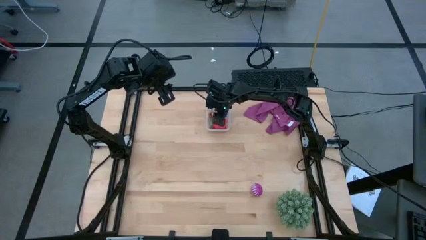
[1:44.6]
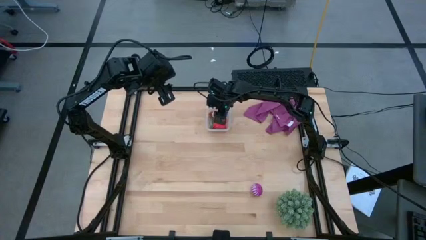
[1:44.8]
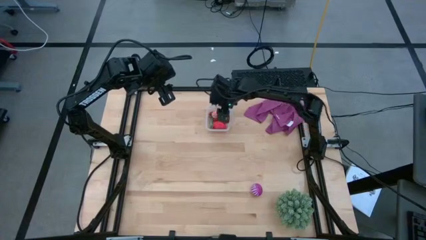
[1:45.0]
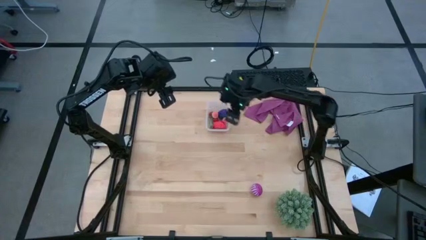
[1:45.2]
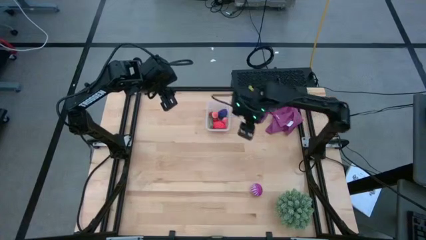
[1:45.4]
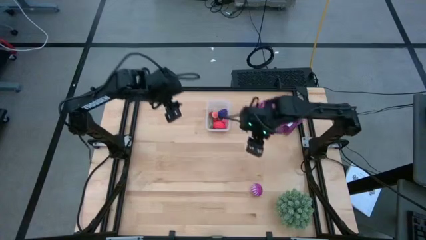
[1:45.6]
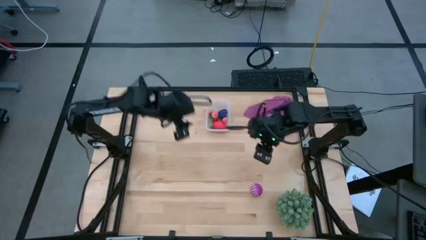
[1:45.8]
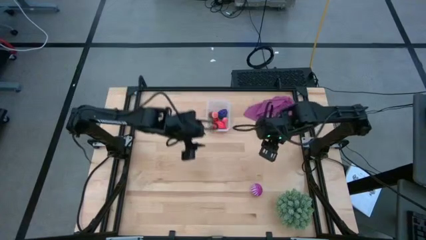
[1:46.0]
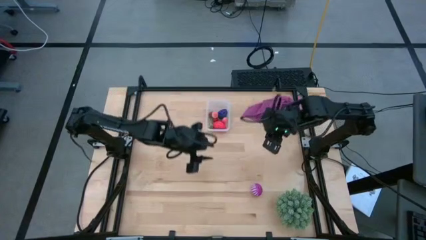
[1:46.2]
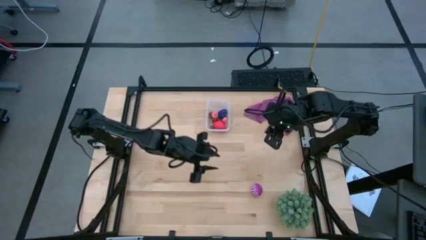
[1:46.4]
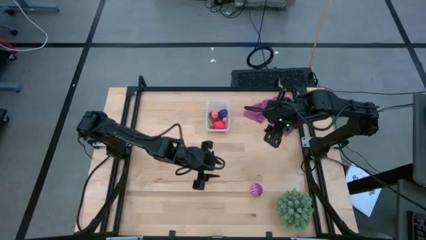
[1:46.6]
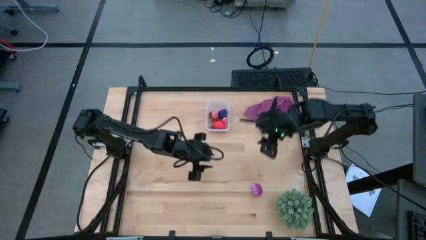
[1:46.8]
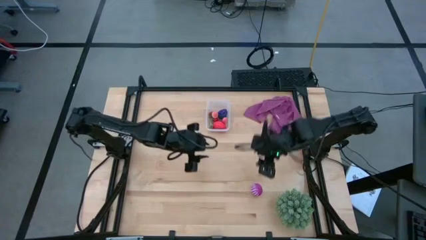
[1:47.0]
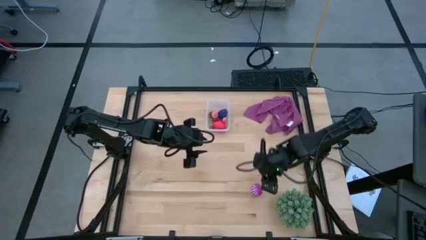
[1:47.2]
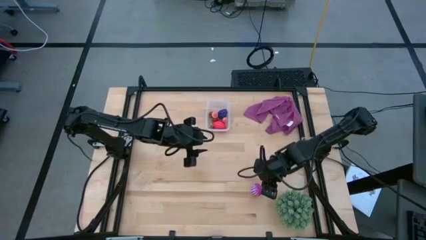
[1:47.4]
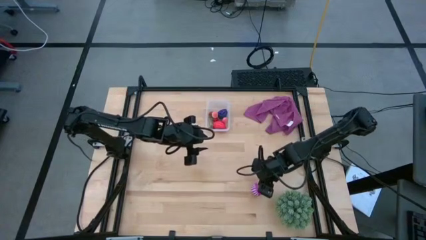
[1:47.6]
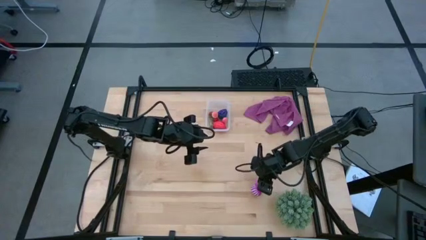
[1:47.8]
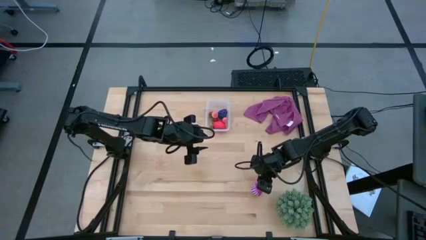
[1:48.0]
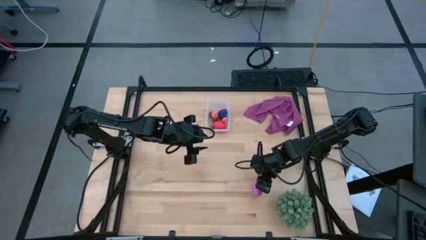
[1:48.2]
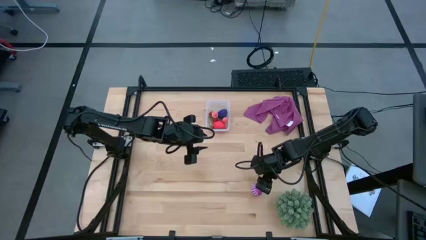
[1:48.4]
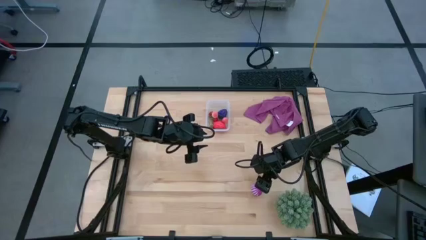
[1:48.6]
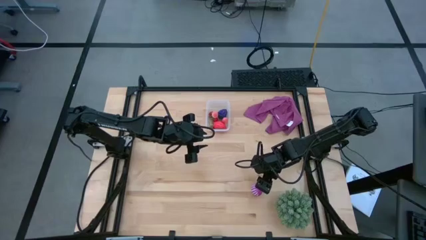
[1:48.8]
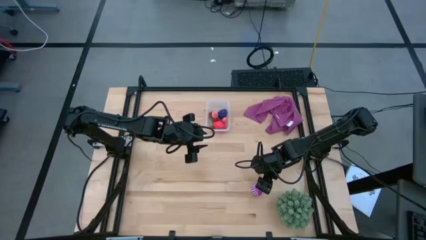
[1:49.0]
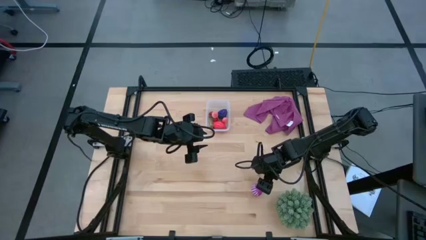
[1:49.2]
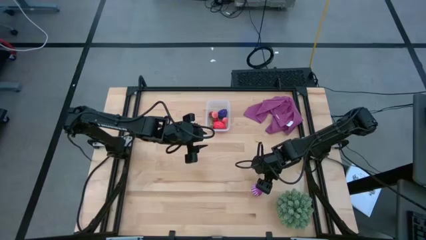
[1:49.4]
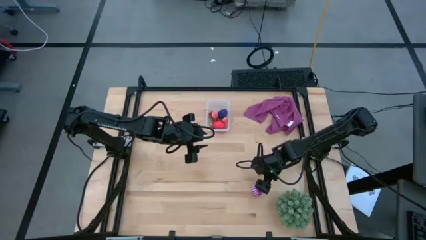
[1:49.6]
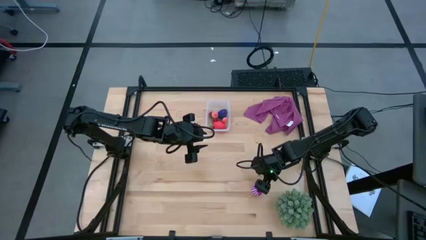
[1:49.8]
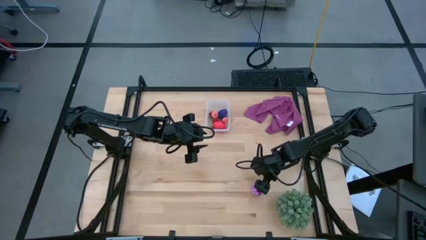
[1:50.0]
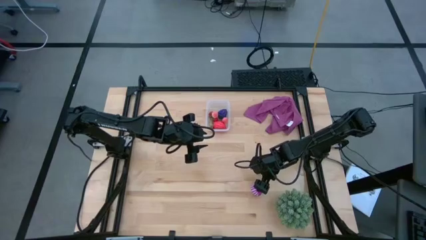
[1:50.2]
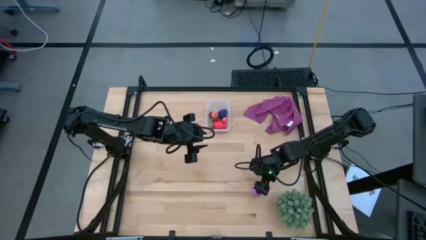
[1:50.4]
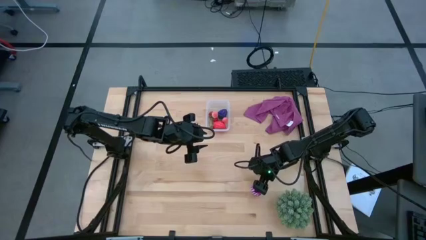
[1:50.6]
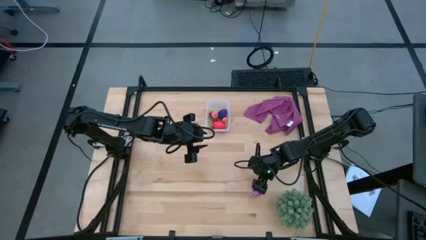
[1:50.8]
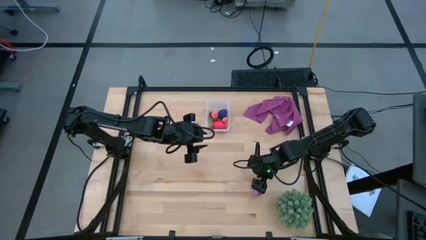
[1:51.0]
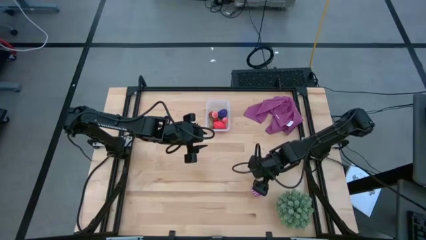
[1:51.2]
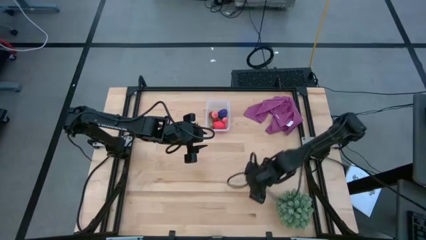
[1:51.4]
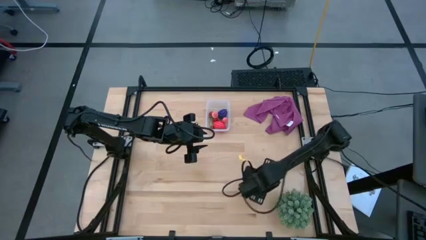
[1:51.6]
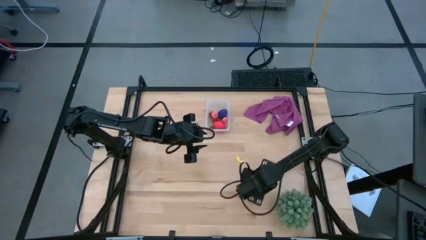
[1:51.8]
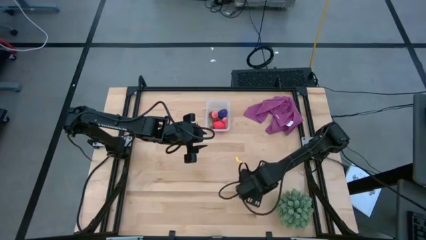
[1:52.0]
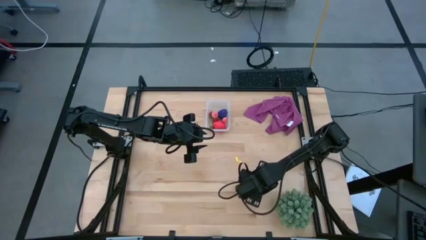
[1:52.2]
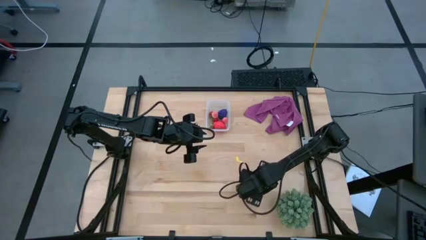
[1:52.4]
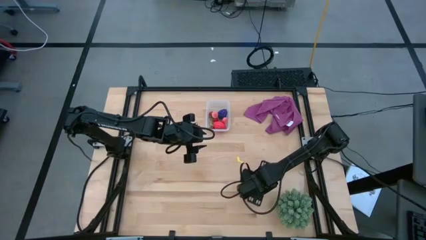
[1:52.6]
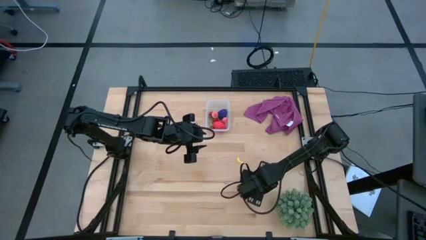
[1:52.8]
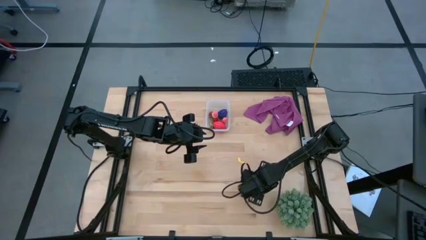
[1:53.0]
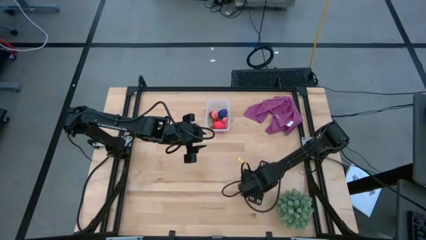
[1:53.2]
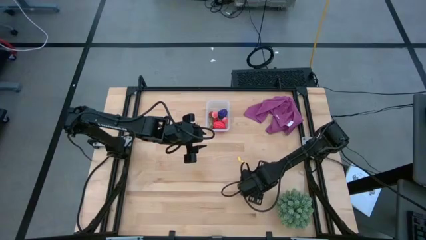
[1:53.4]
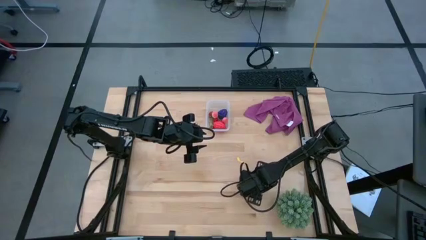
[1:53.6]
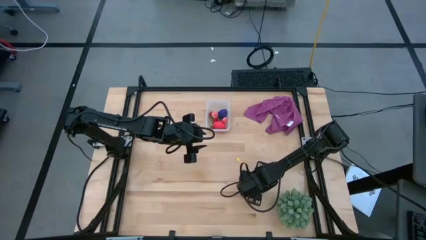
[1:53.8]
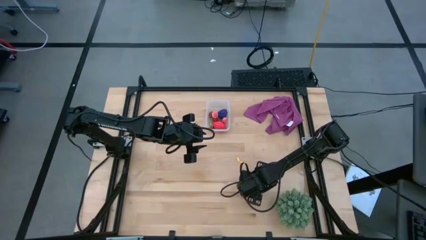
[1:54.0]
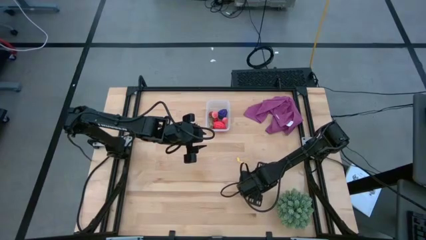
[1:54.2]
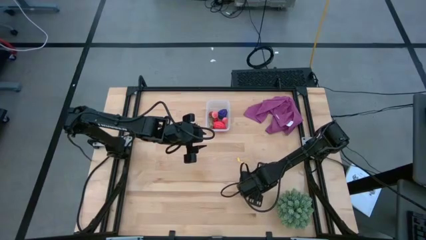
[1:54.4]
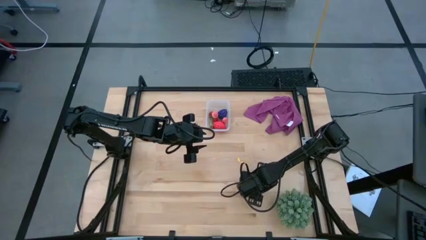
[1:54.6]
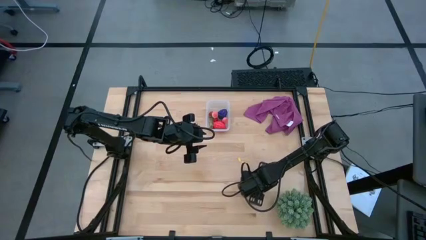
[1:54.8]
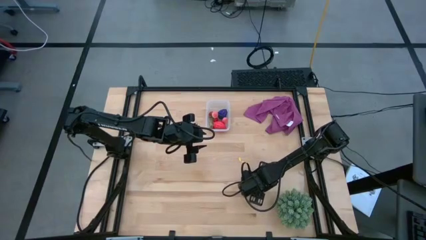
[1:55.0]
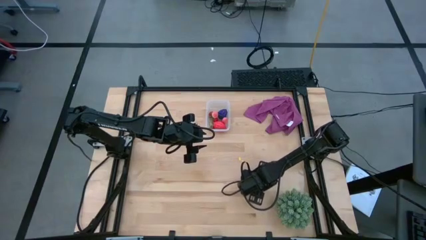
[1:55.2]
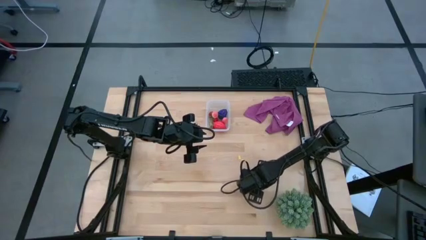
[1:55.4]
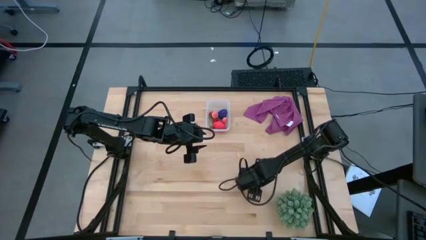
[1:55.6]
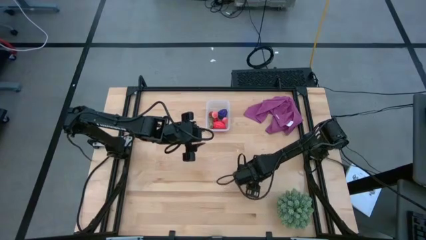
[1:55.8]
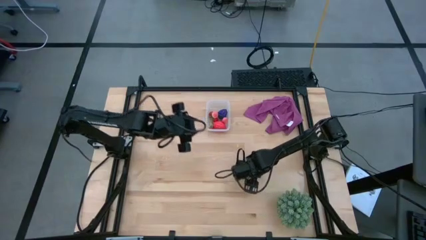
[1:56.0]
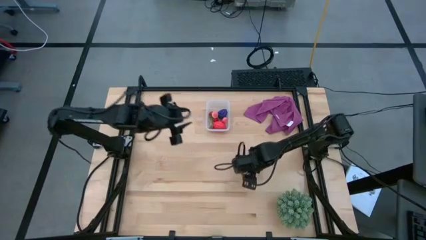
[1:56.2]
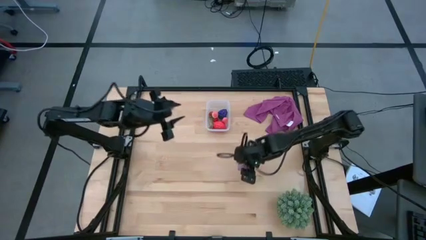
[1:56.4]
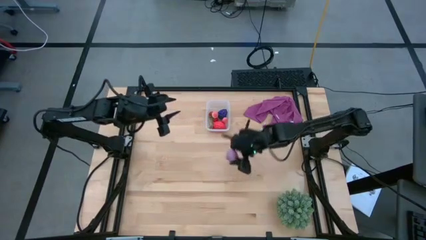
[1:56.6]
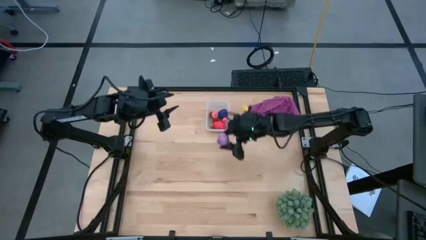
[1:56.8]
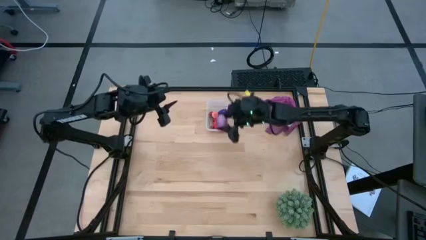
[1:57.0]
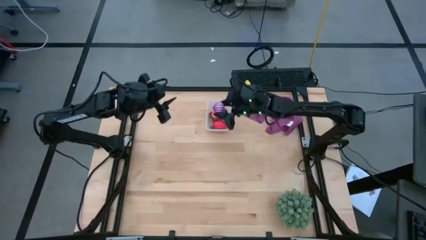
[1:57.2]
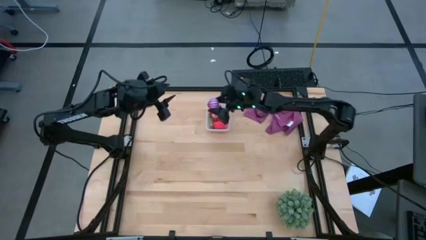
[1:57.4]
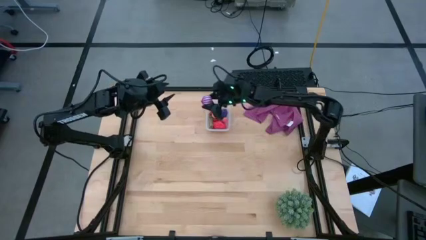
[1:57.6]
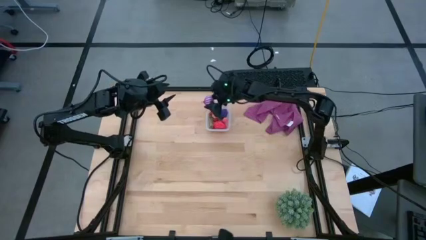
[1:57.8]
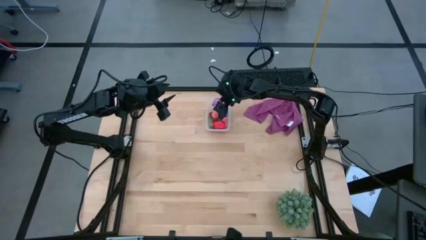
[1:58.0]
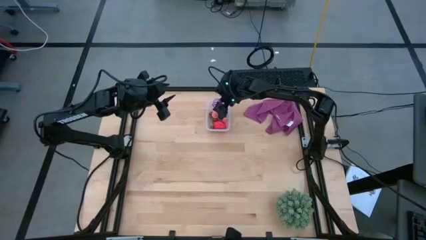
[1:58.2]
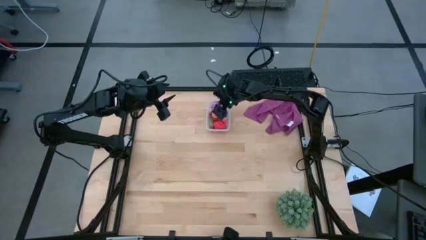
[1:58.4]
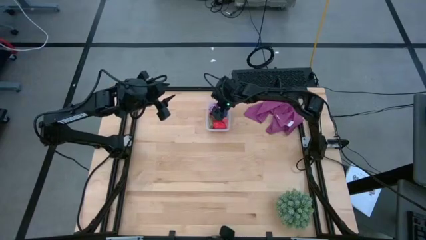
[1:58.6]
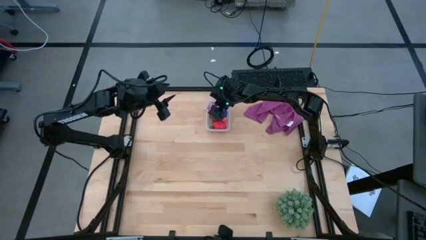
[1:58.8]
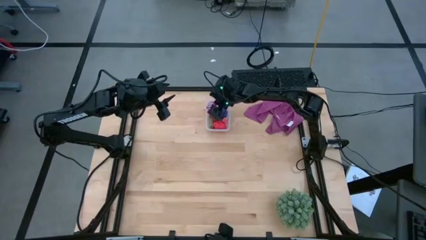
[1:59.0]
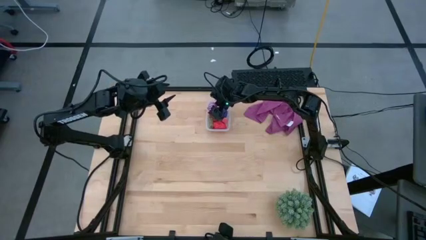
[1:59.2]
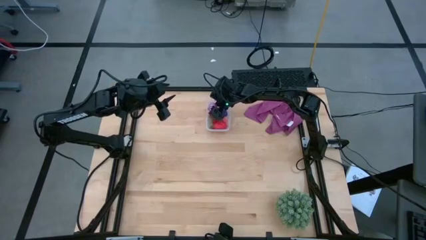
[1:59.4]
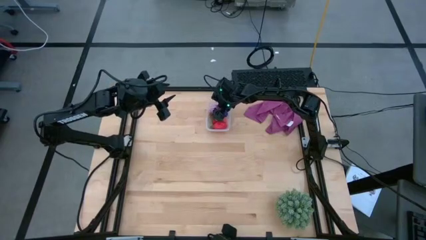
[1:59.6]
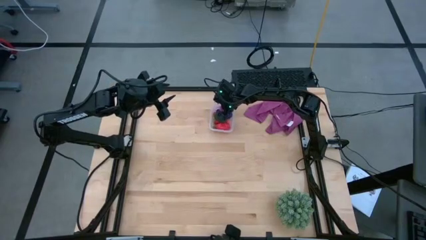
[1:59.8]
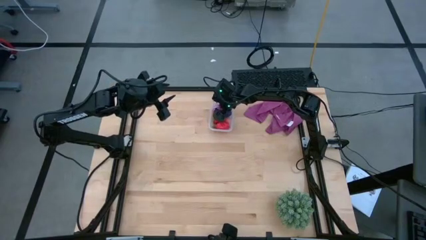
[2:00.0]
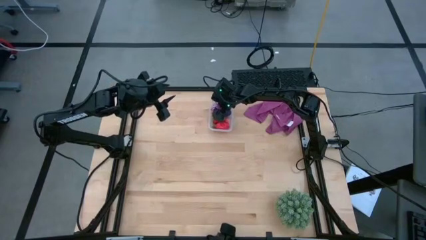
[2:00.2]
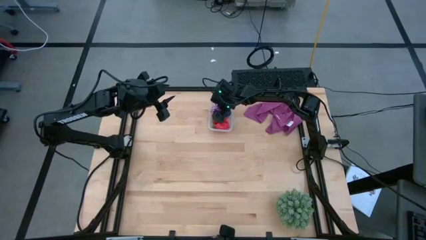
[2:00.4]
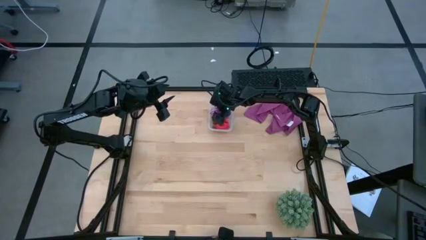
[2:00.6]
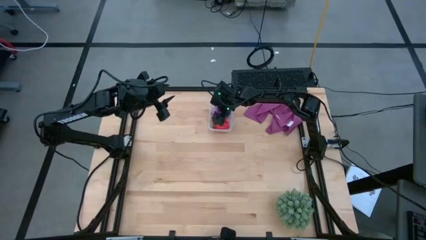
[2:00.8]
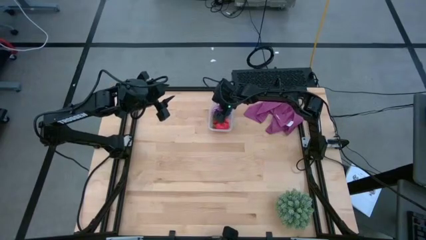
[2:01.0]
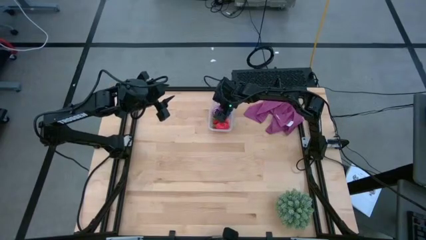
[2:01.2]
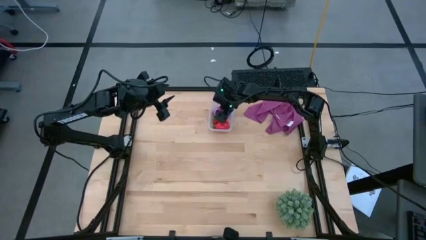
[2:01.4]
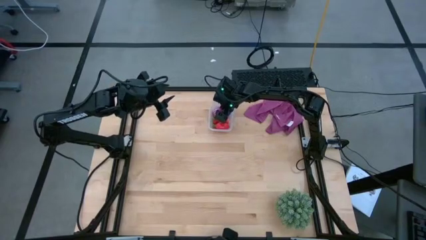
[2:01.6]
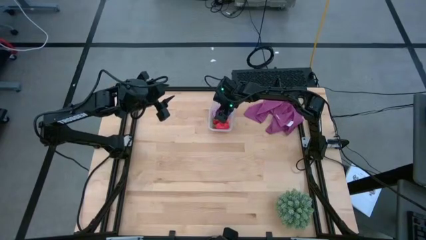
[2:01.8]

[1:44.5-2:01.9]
Task: Pick and placing Produce into tupperware
Put the purple onion into the transparent bin
